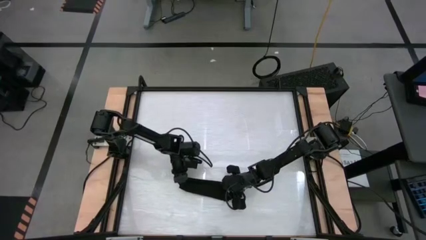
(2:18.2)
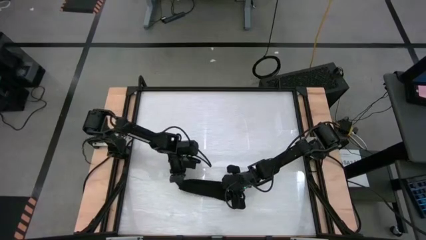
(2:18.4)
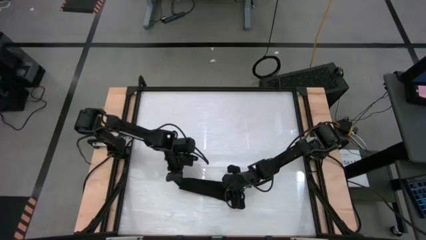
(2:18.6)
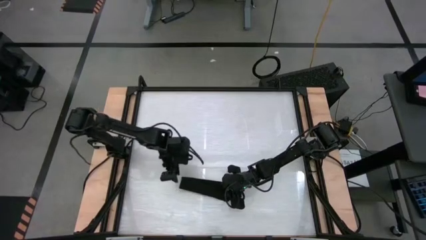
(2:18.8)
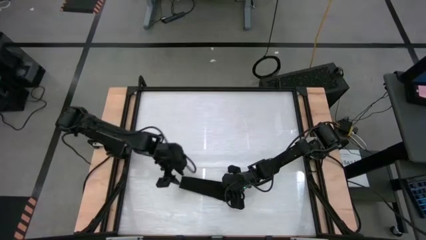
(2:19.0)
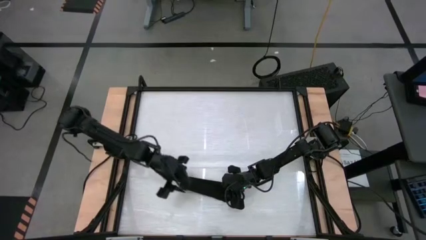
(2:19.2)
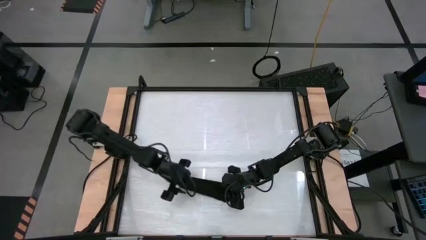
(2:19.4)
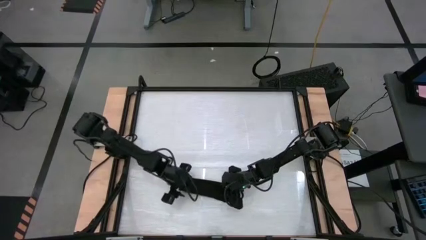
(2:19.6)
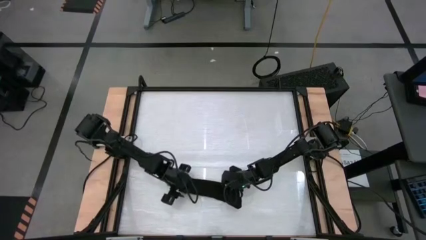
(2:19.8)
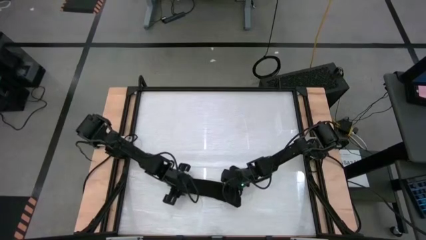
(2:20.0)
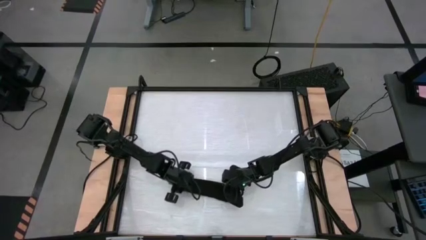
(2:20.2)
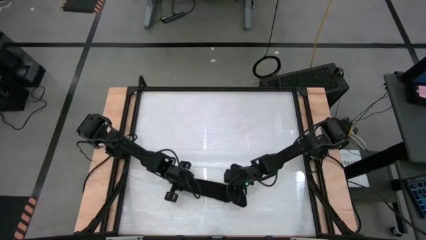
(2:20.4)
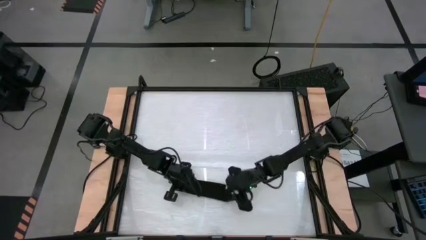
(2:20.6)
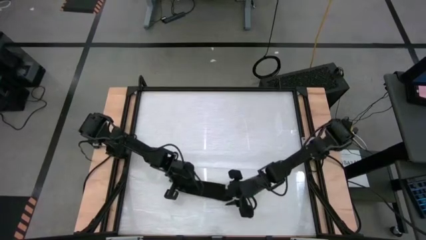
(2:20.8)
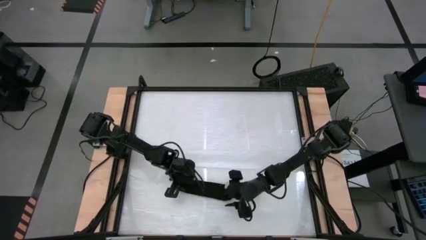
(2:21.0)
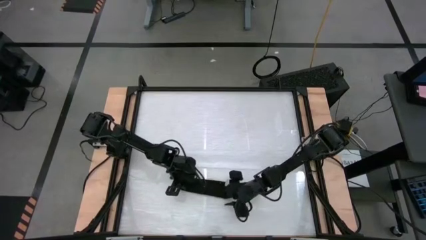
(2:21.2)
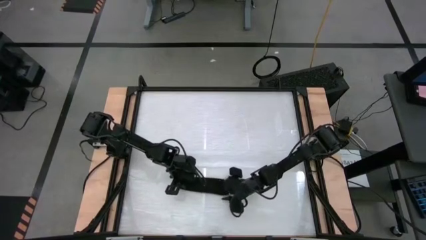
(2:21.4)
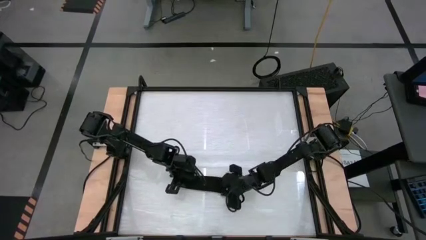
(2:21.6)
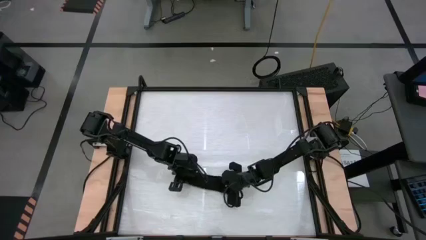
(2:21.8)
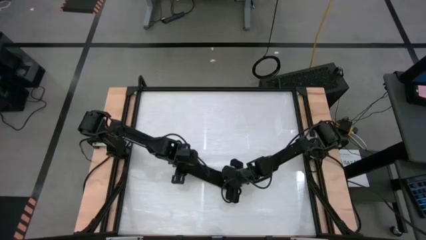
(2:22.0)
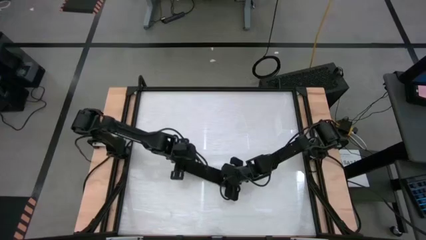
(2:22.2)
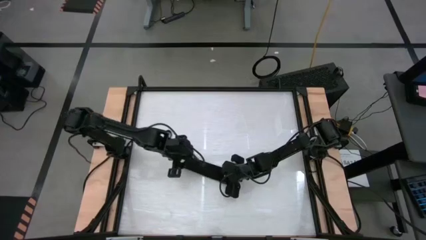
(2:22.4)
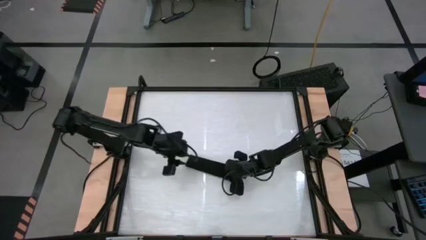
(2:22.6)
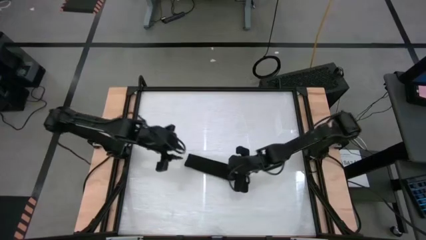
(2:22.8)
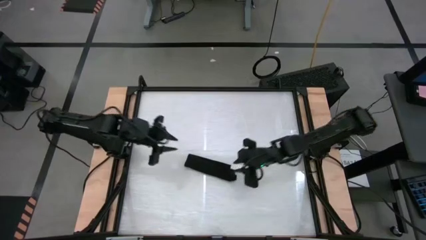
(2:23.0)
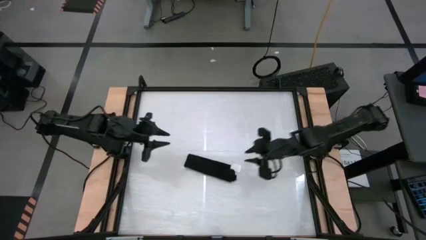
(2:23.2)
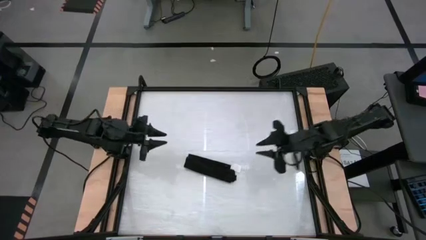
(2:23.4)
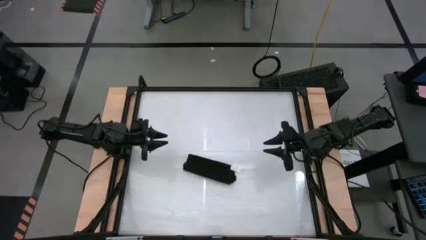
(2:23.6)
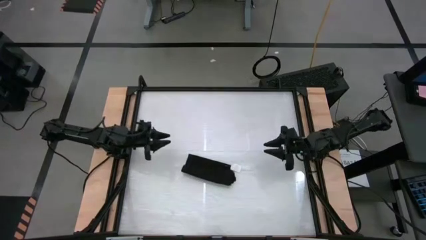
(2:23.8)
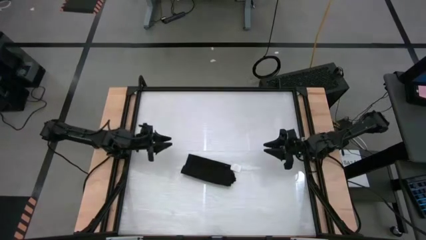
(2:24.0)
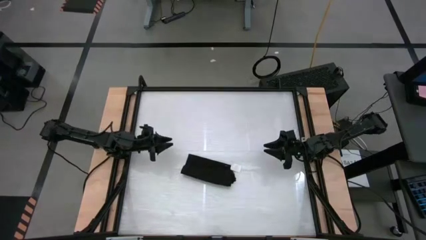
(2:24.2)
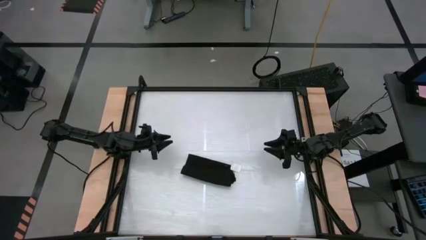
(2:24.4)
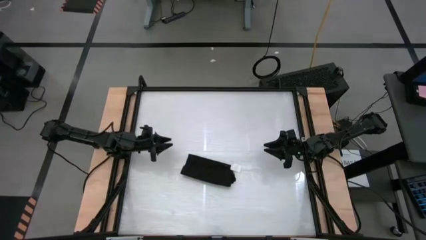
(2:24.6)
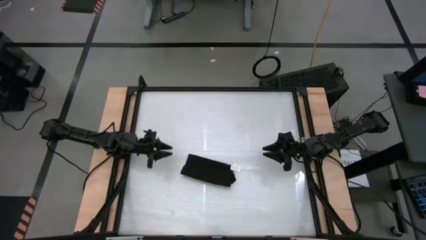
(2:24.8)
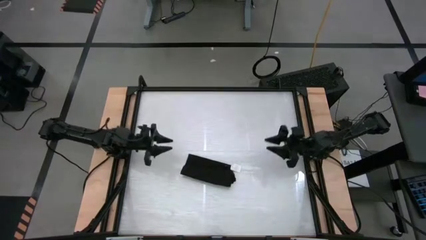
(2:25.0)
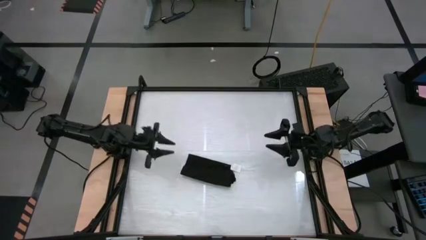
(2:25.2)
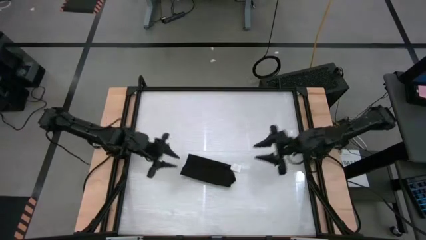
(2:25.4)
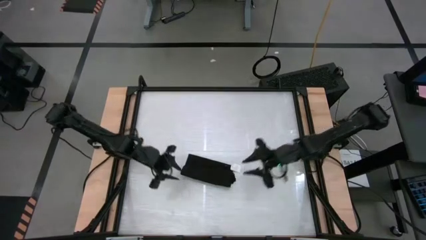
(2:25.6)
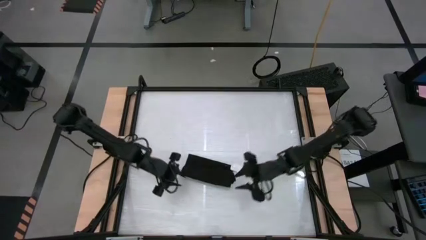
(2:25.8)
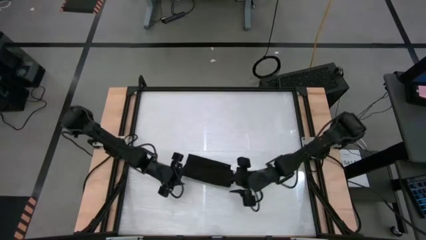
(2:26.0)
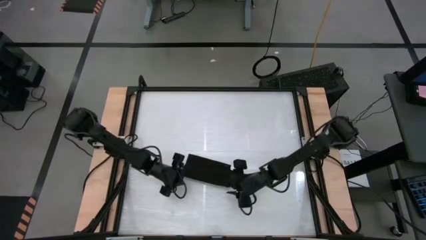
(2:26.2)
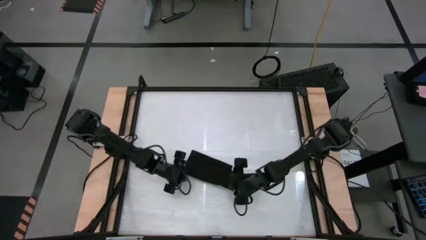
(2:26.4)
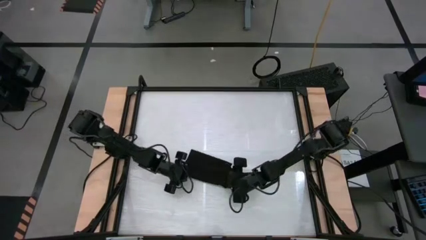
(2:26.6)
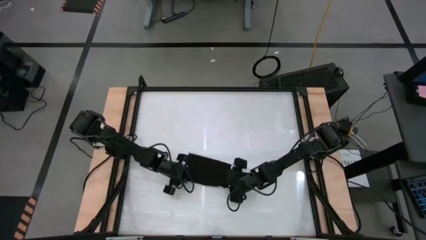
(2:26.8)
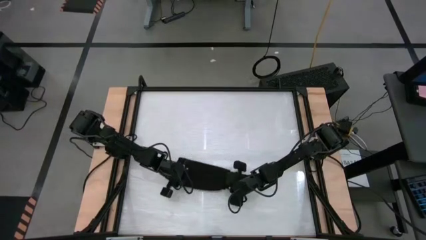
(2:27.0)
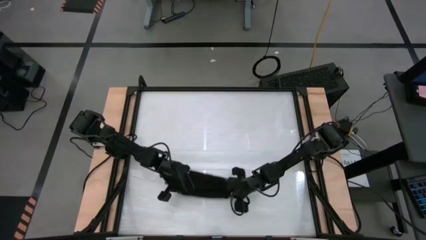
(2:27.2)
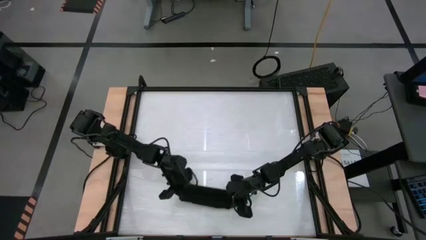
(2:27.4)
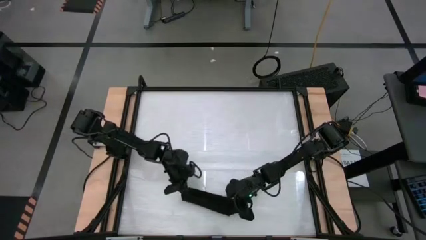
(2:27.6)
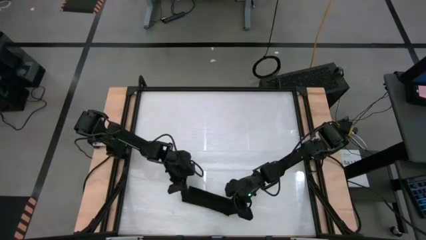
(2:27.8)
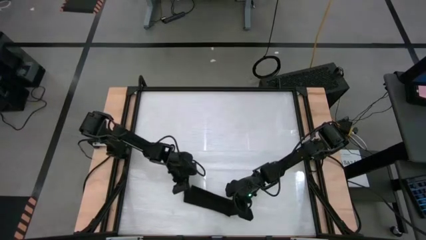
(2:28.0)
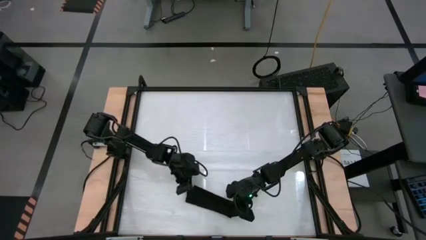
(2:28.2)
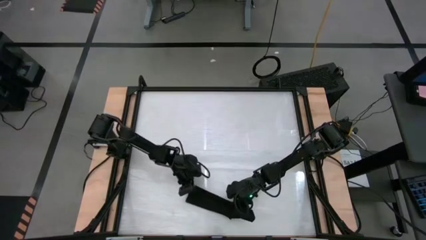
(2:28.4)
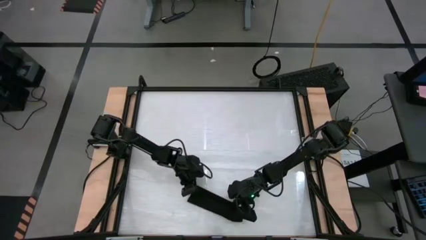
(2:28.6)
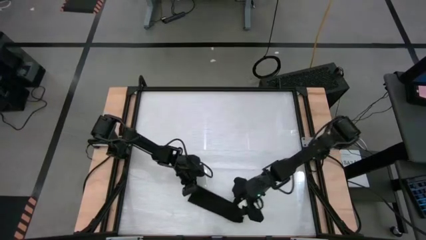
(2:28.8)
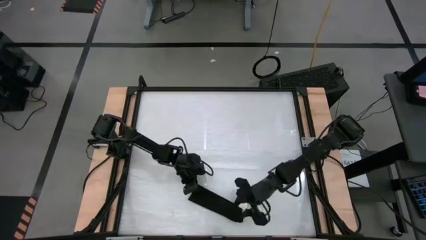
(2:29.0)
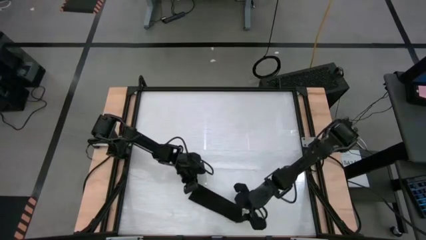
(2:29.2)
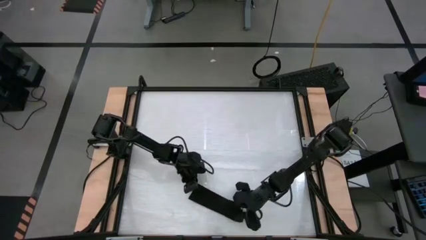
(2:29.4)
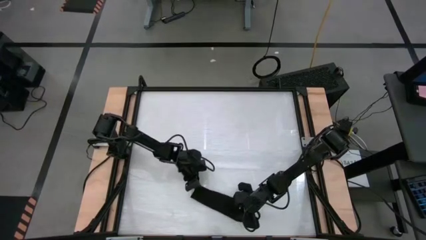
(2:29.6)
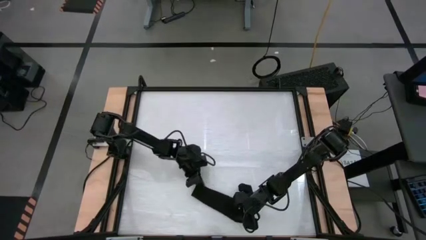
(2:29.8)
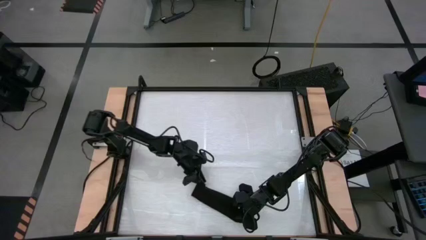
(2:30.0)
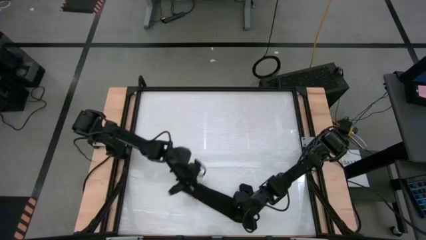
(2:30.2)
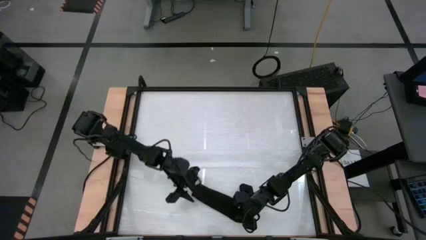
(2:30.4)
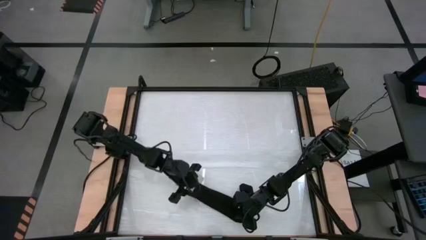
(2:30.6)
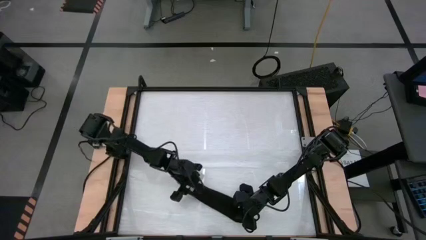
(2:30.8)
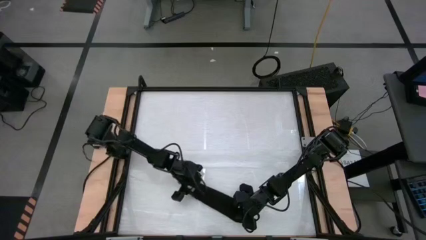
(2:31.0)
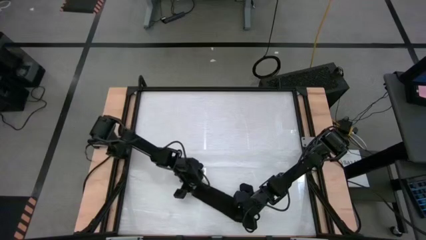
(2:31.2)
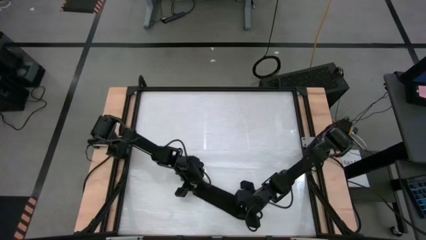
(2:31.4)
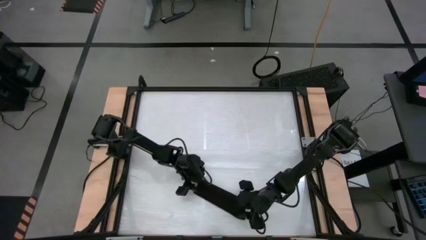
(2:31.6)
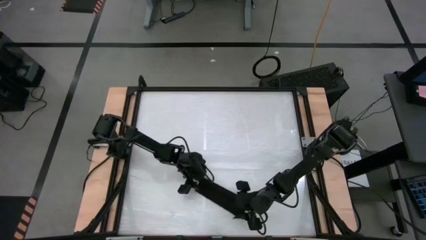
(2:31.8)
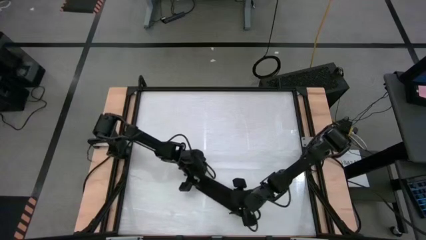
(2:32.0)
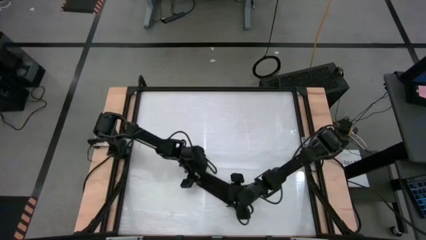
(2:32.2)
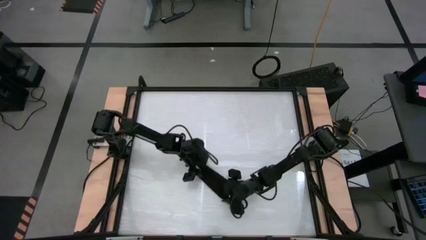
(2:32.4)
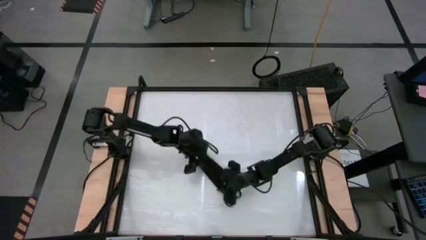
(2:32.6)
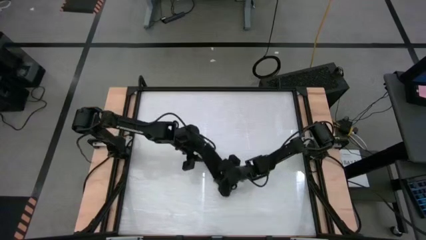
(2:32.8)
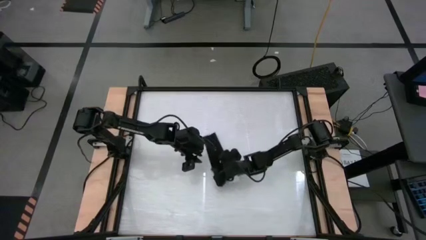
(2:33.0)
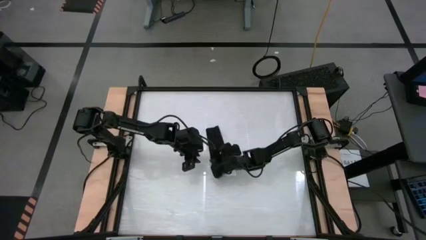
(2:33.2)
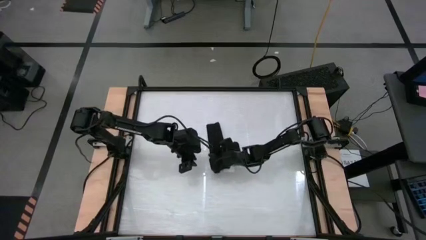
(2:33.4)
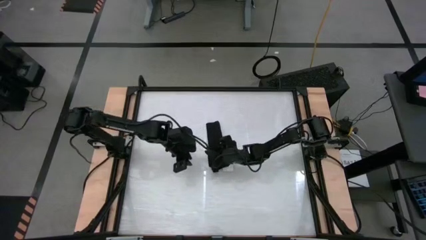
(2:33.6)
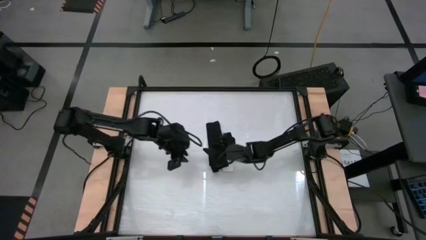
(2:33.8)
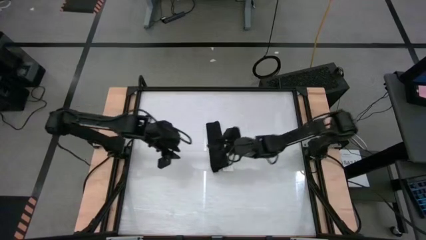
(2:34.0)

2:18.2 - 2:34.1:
Task: Roll napkin
Roll the black napkin

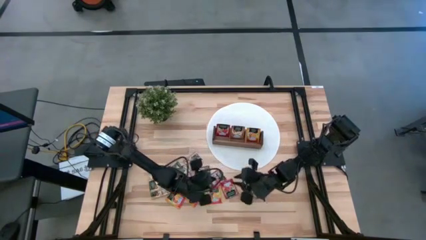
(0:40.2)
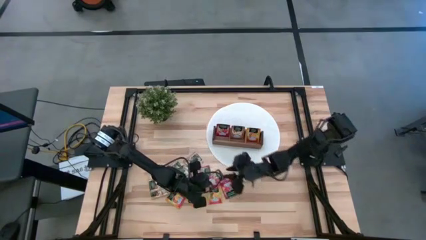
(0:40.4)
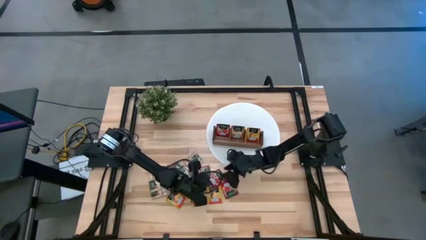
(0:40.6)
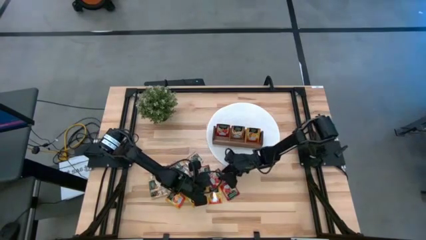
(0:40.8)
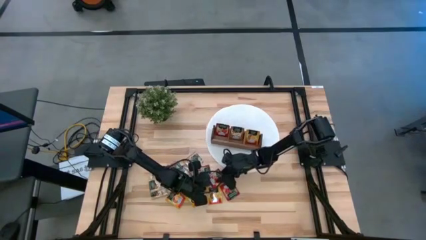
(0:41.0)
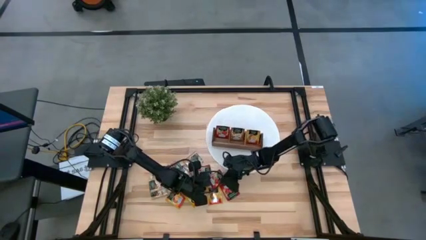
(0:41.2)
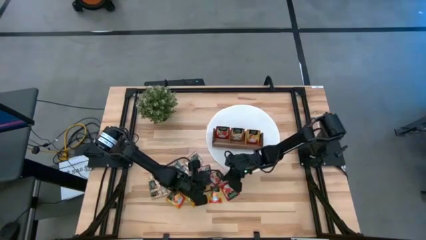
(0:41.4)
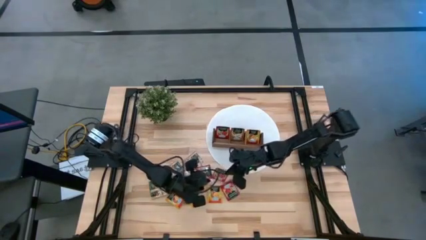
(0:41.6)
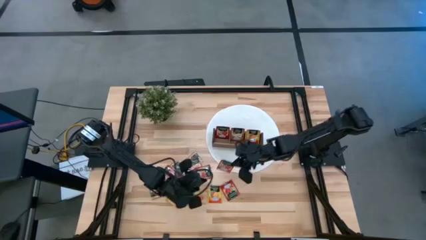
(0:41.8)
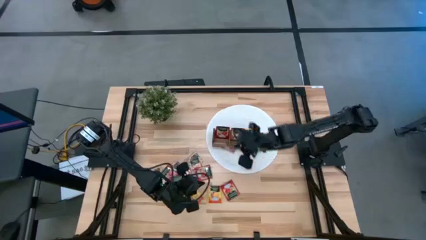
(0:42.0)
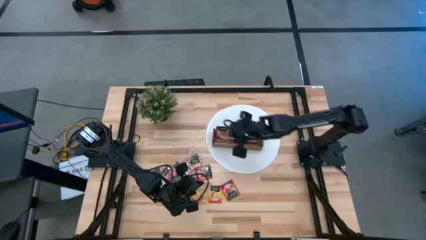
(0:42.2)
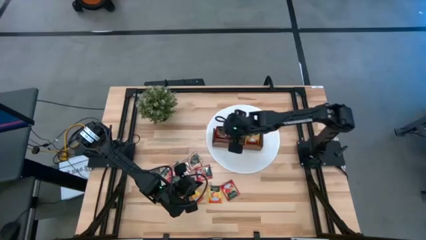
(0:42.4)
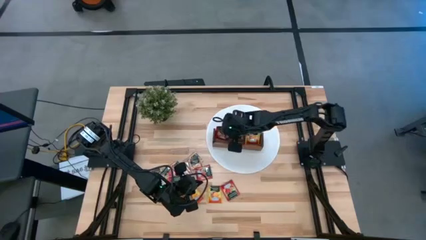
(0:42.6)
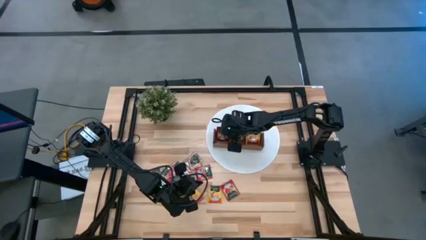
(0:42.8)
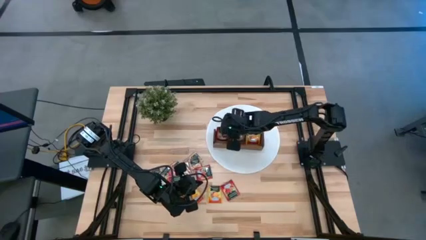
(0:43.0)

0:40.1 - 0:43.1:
Task: Pick & Place Tea
Put the red tea bag into the left section of the wooden organizer
